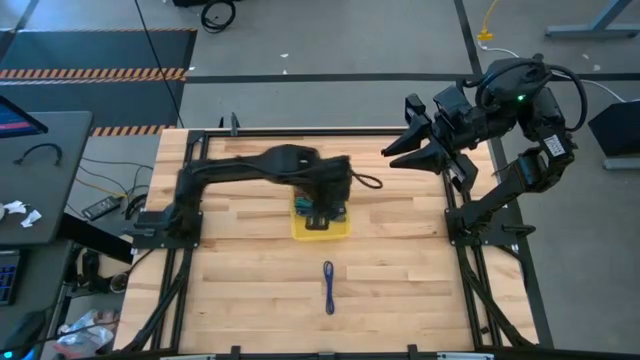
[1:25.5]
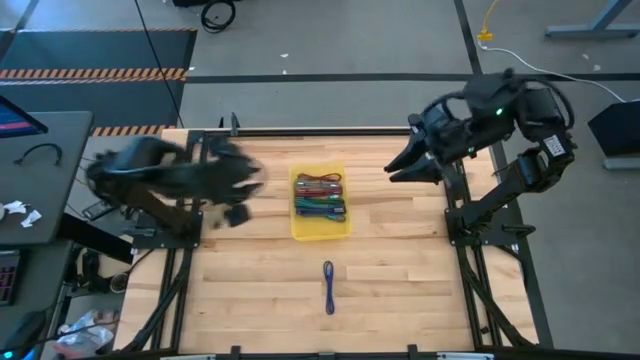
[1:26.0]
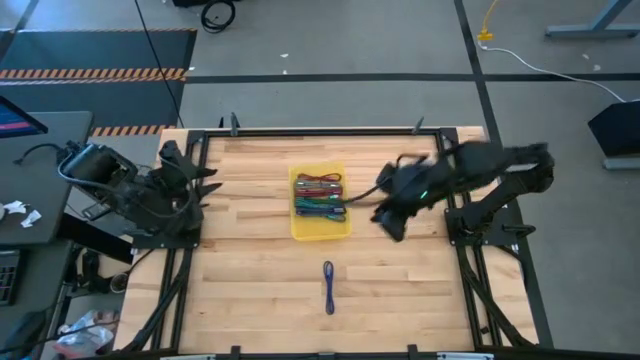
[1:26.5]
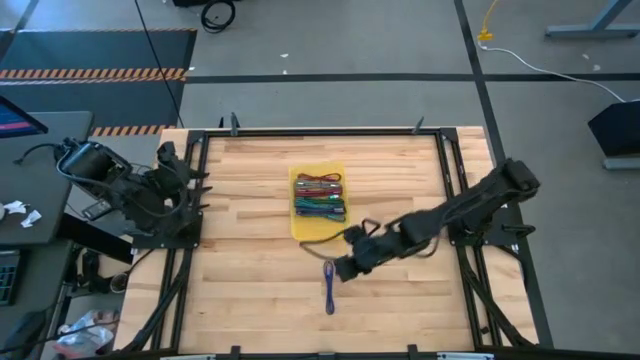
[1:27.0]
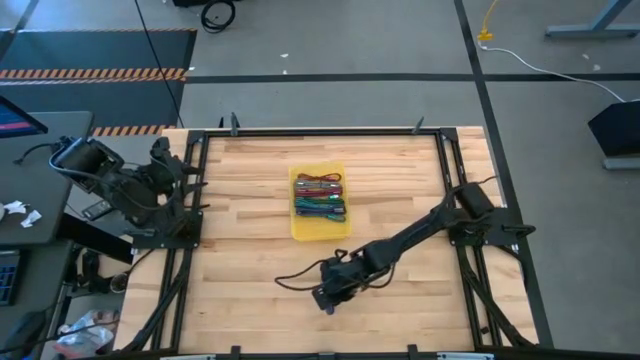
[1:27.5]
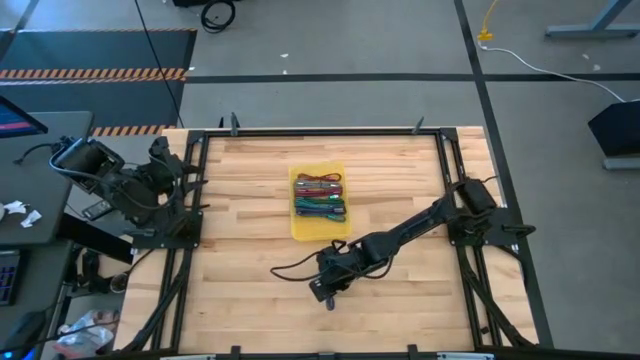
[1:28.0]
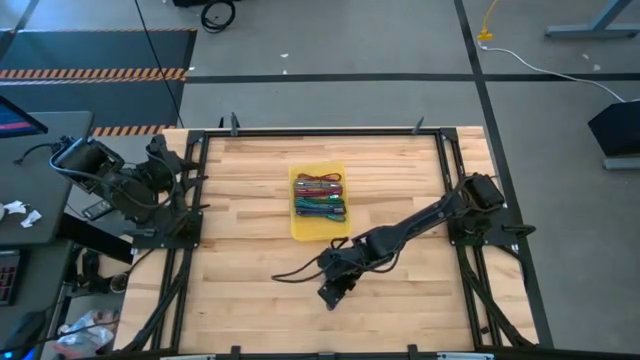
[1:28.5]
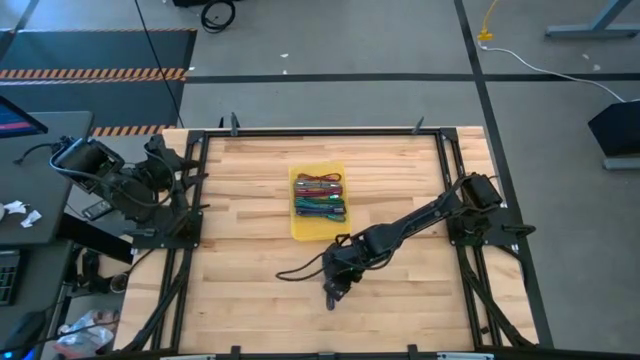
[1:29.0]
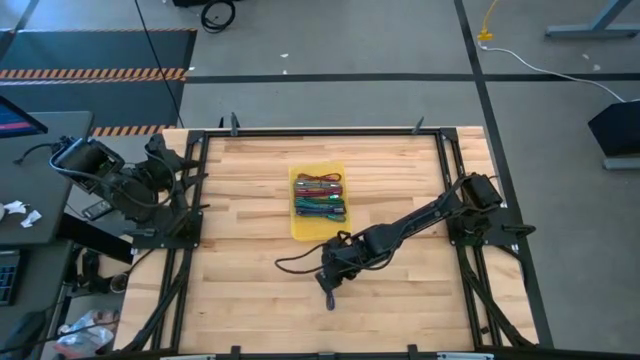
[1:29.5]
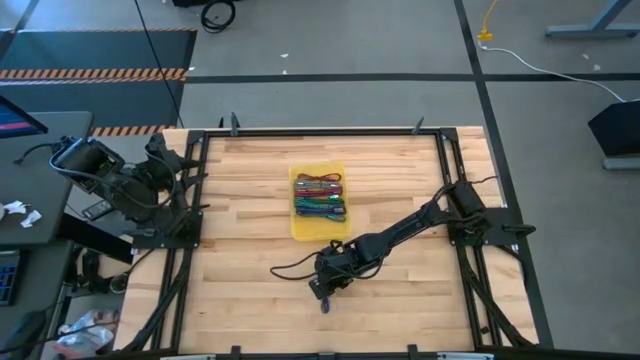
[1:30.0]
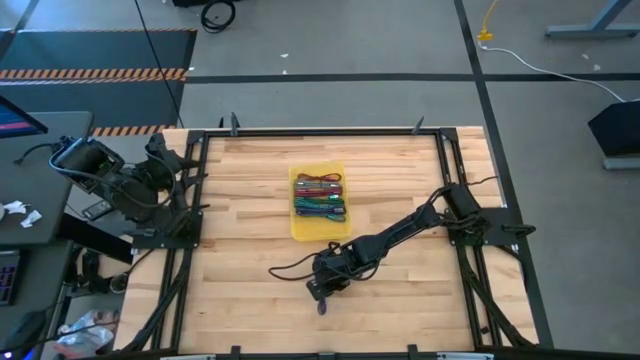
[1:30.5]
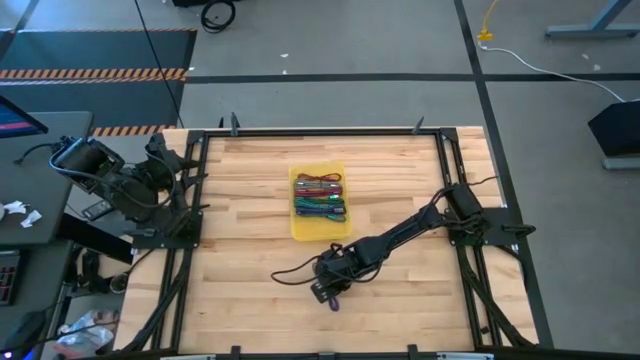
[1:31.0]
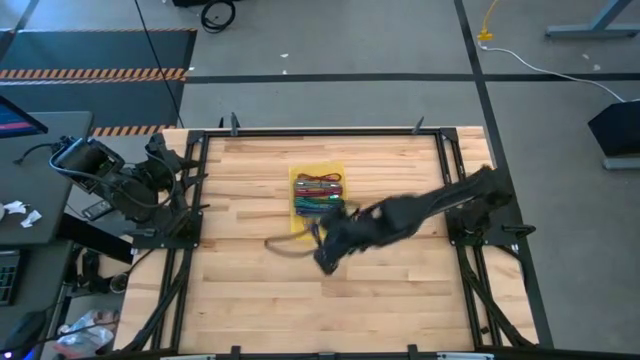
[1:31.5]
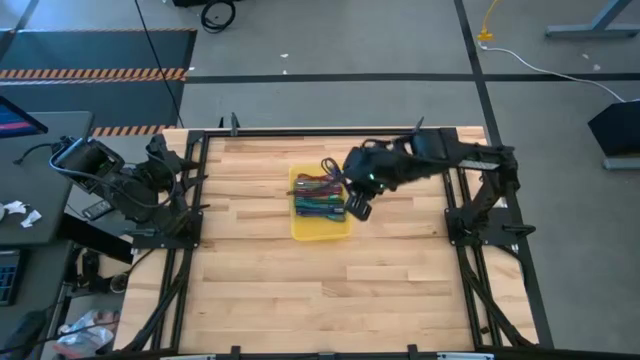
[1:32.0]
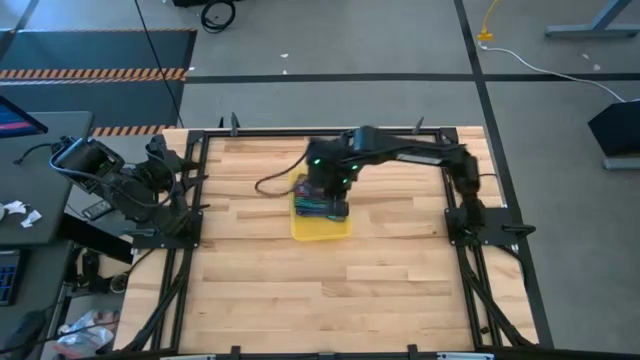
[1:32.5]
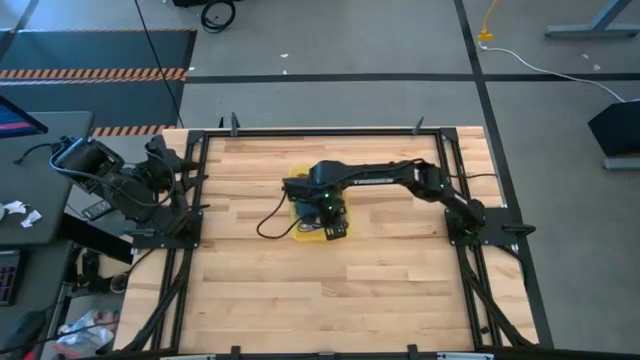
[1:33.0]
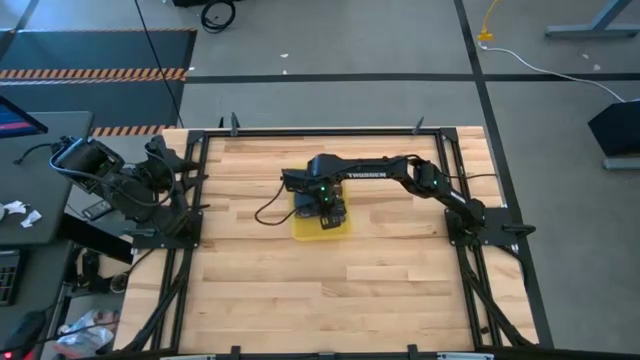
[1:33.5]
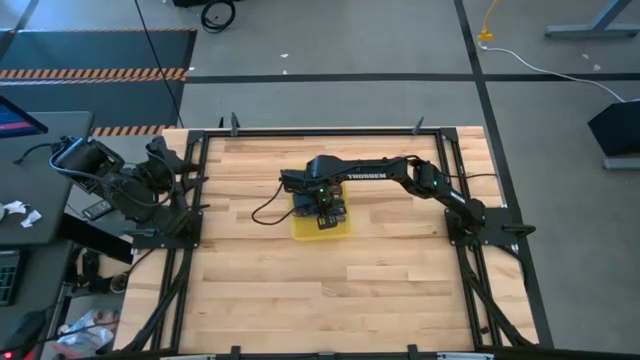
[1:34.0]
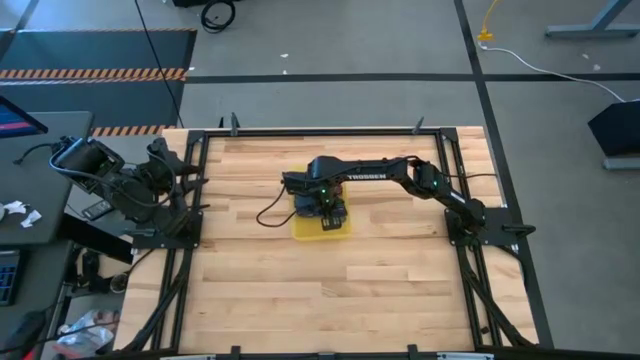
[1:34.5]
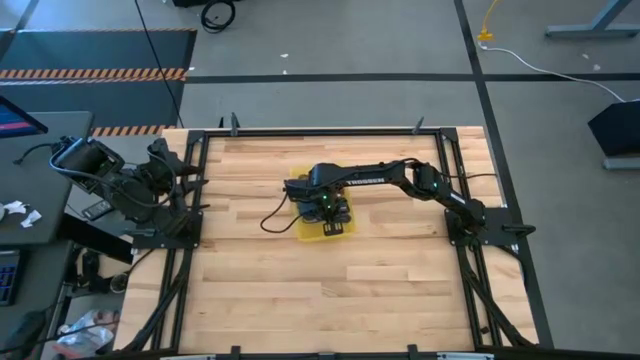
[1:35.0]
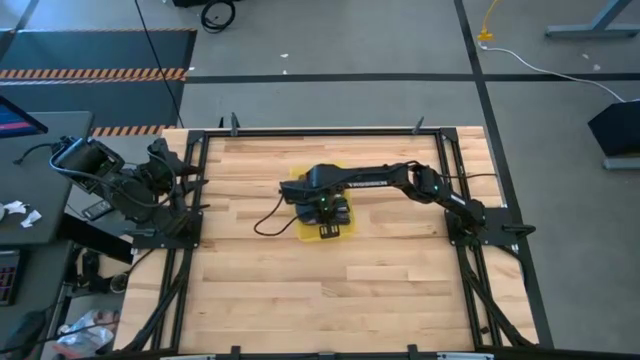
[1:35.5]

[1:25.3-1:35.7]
Task: Pick and place USB-C Cables
Put the dark blue charger cable into the yellow bin

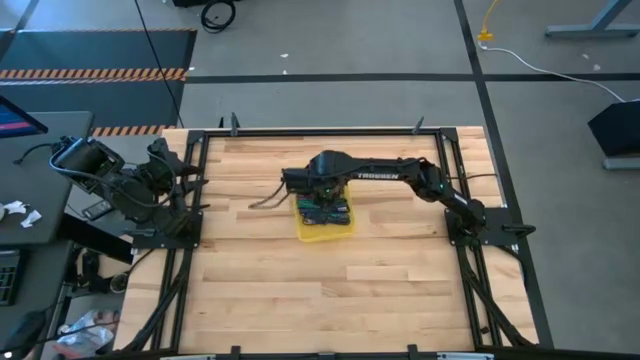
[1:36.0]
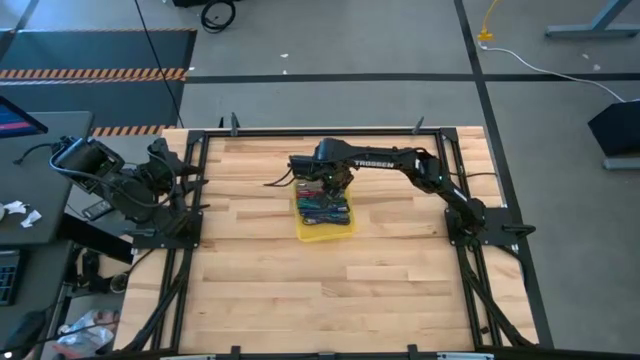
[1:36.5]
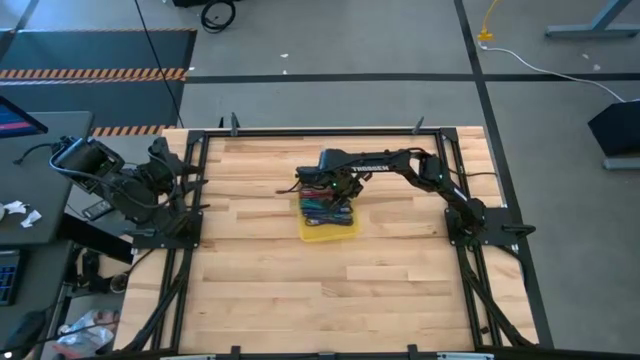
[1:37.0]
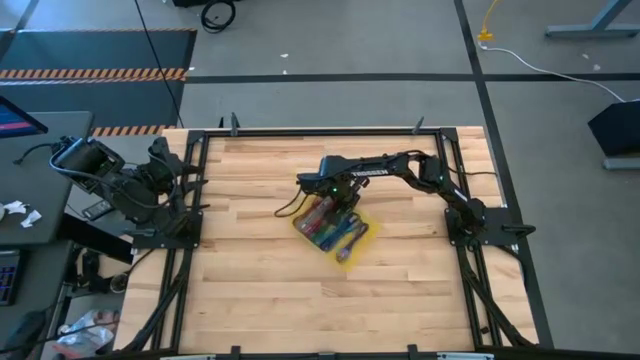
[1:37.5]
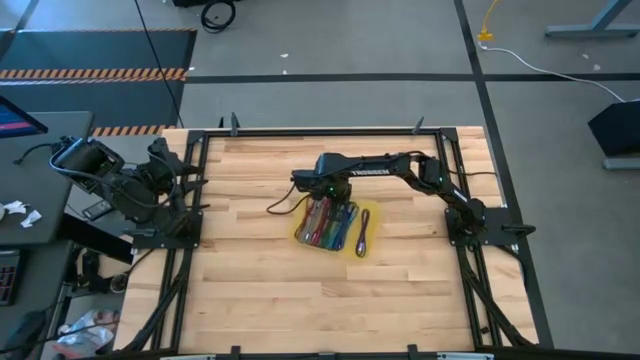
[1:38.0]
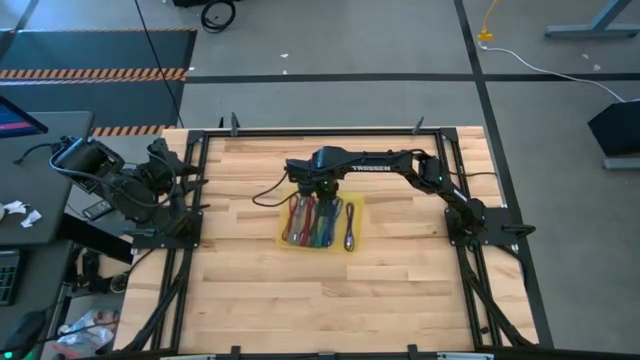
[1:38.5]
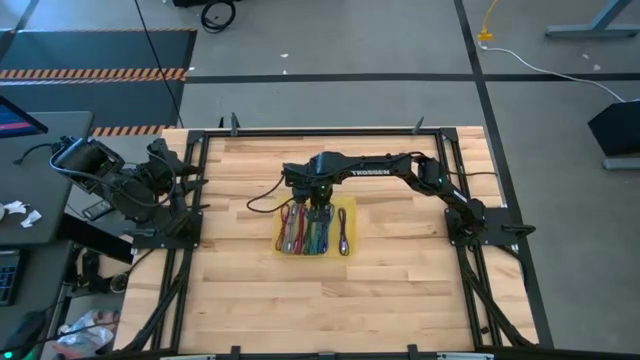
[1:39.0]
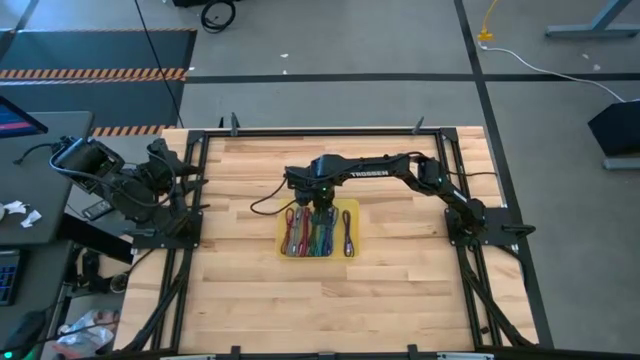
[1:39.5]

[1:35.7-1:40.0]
Adjust the yellow bin

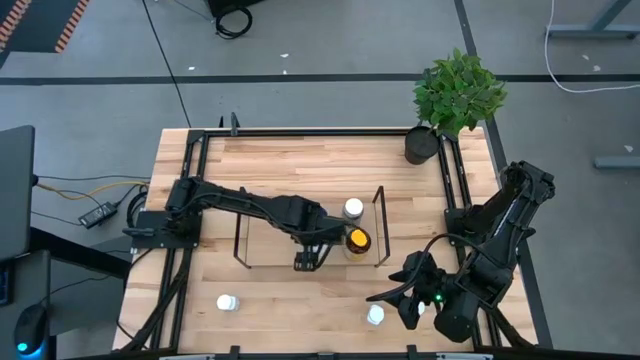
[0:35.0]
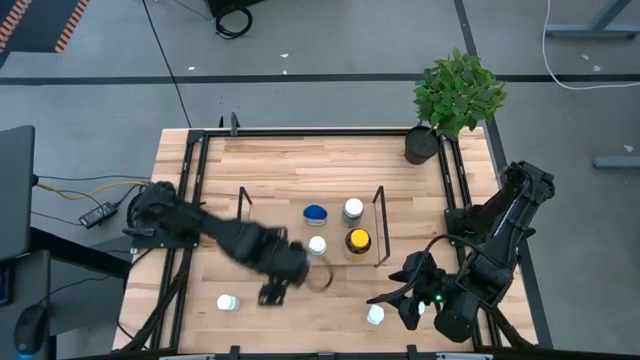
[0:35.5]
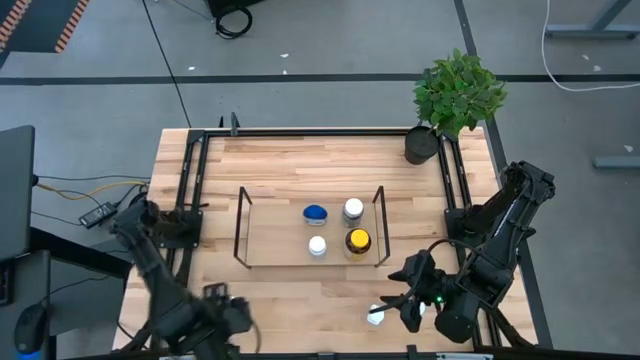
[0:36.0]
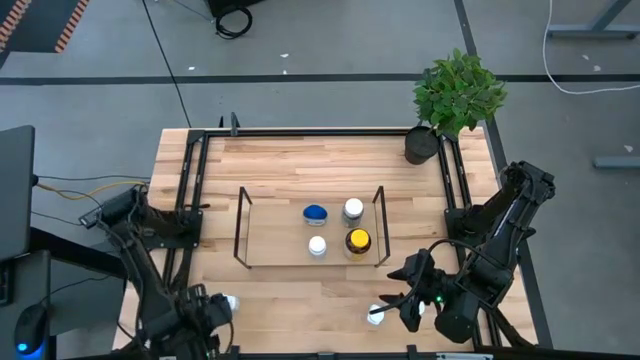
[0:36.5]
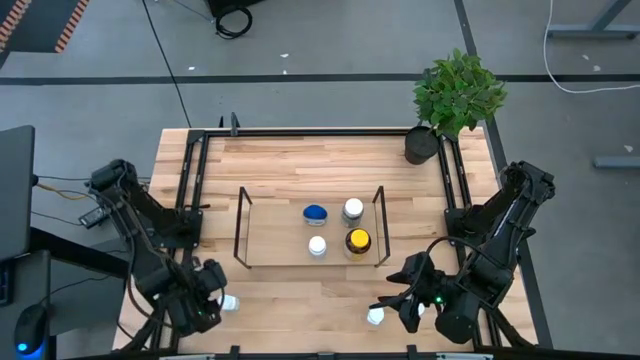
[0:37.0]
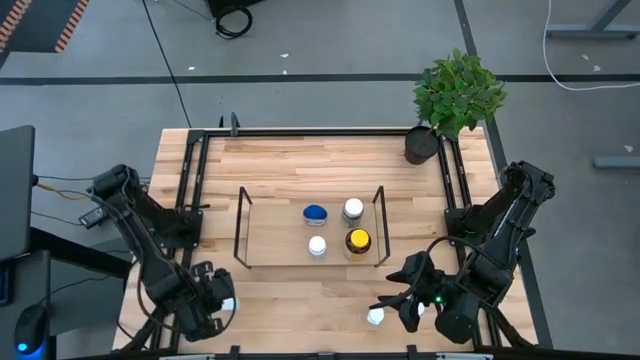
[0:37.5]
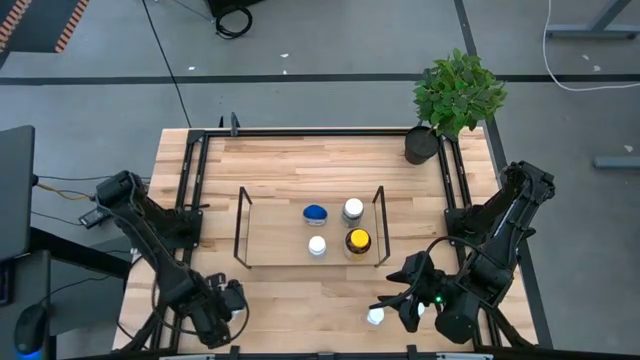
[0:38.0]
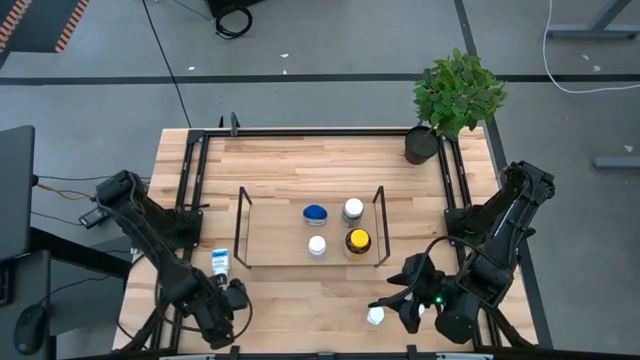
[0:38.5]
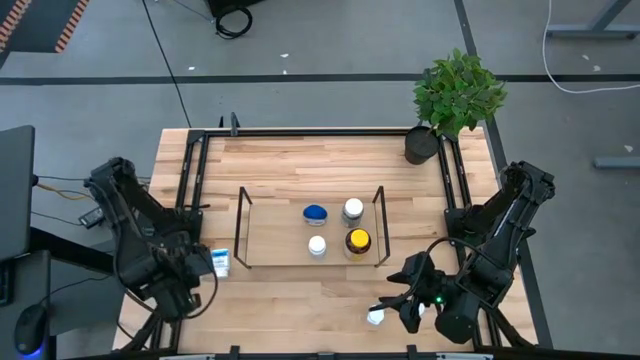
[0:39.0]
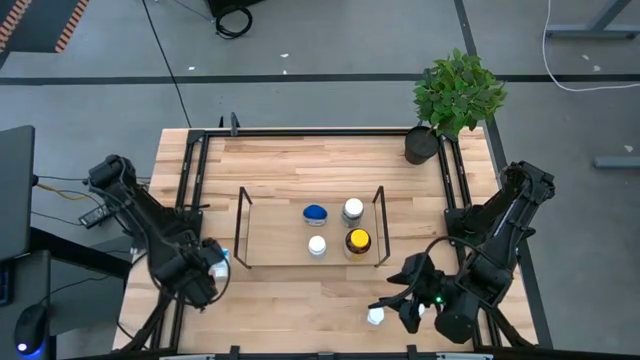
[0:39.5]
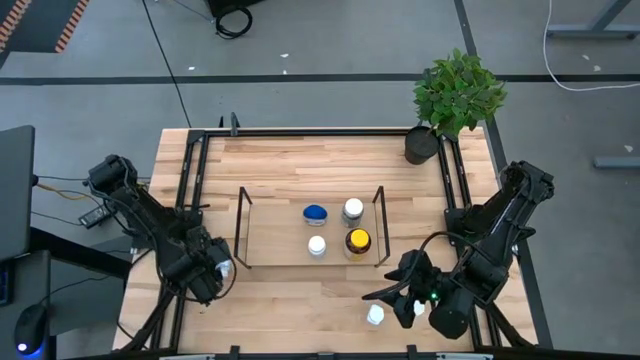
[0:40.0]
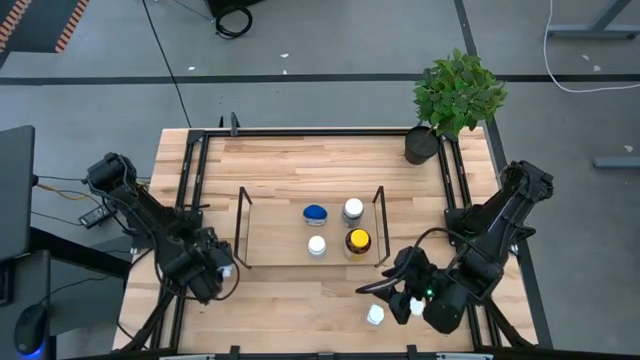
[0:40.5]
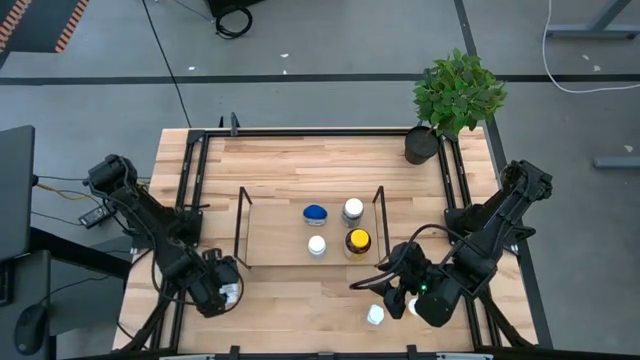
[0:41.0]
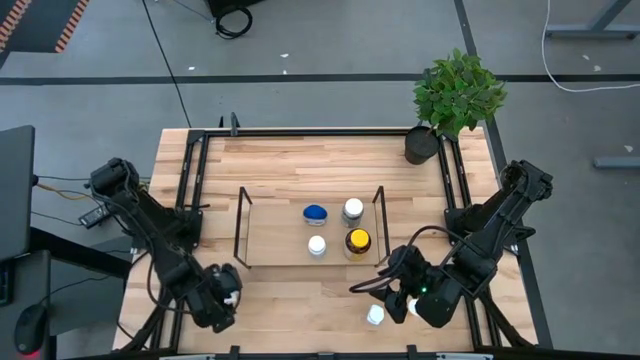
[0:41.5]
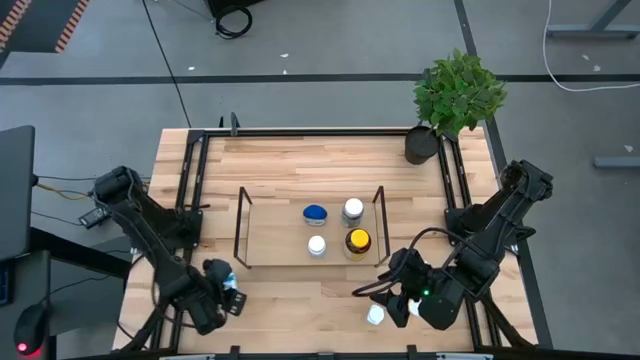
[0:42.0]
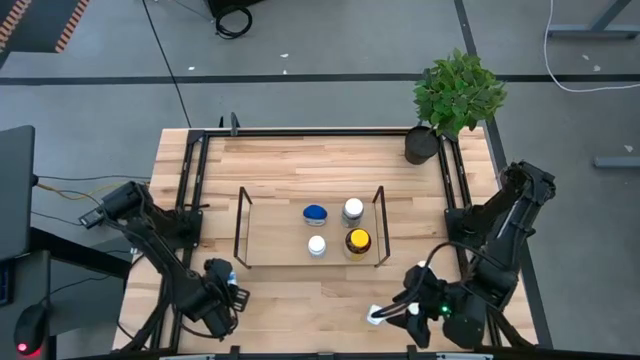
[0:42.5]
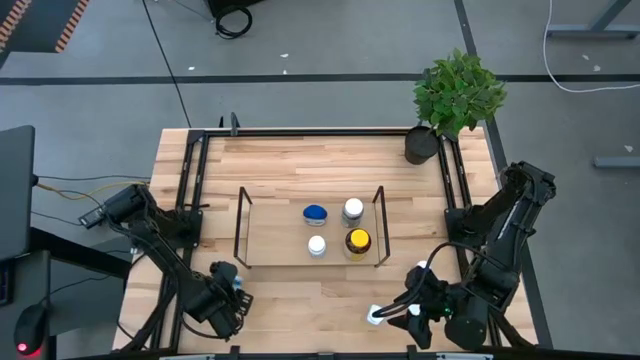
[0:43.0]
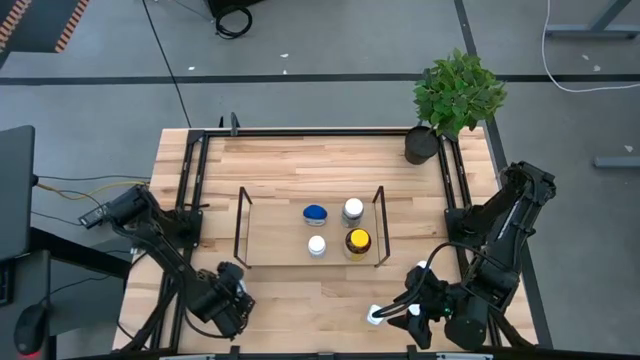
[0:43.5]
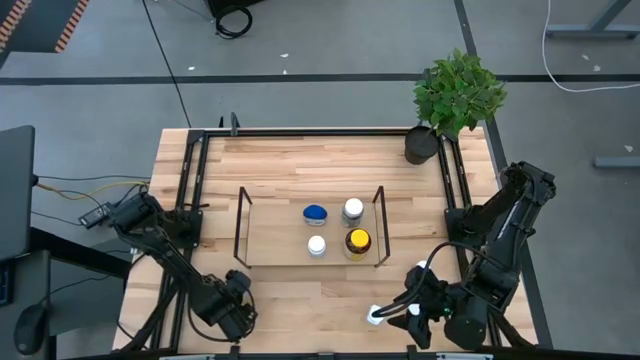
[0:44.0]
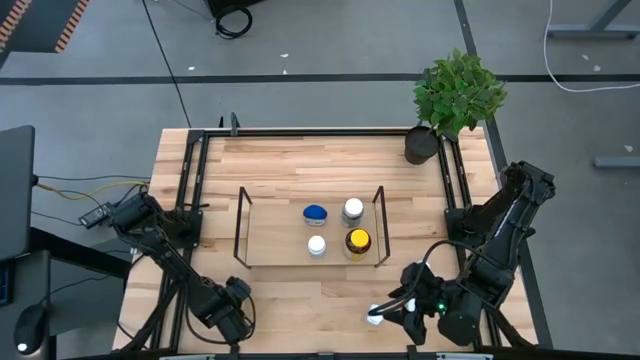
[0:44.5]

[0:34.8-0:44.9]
Task: Pick and place medicine bottles onto shelf by color
Put the white and blue medicine bottle on the shelf
